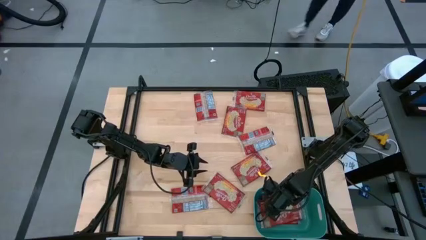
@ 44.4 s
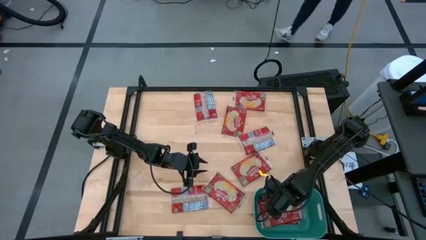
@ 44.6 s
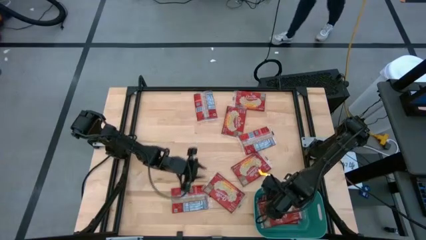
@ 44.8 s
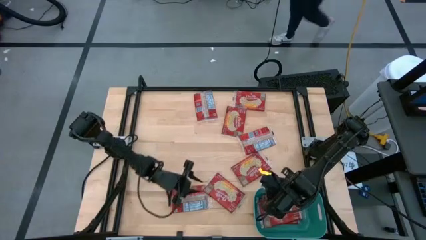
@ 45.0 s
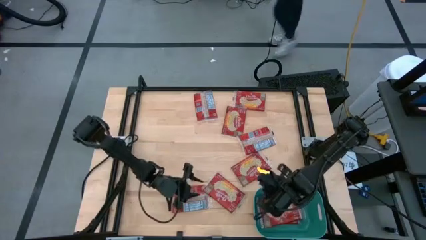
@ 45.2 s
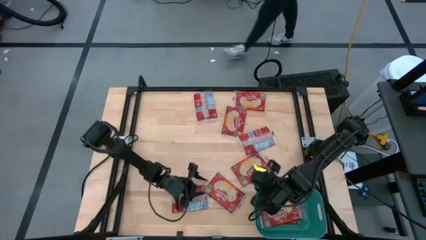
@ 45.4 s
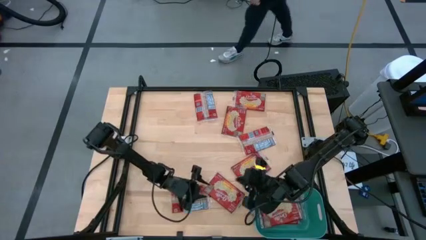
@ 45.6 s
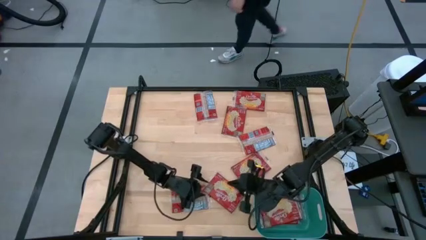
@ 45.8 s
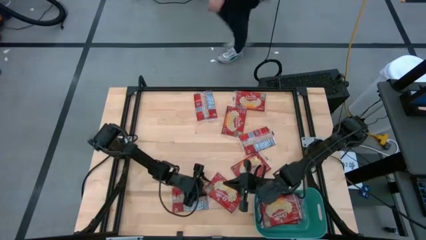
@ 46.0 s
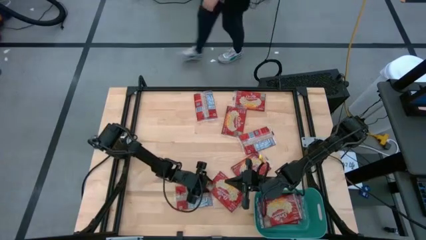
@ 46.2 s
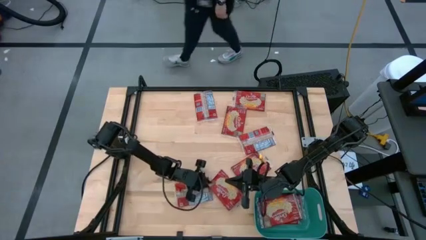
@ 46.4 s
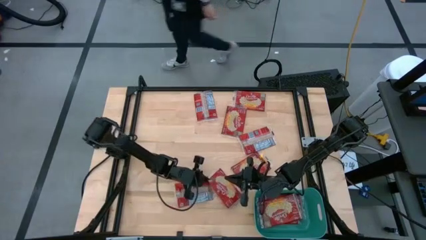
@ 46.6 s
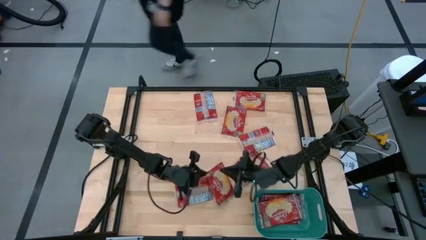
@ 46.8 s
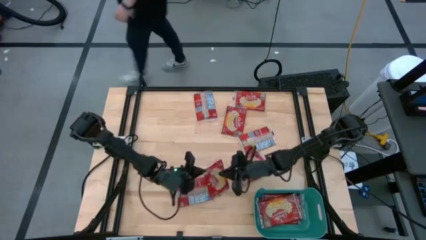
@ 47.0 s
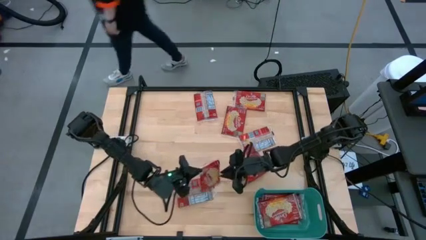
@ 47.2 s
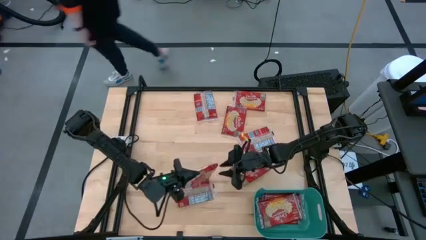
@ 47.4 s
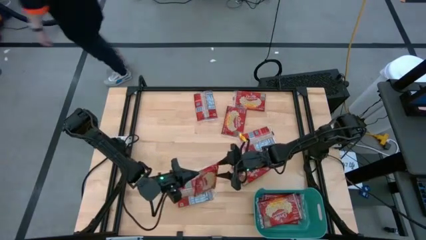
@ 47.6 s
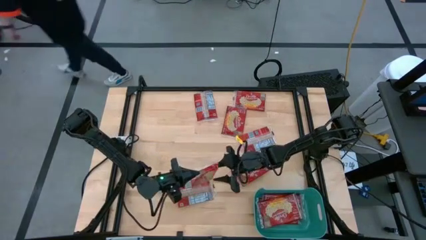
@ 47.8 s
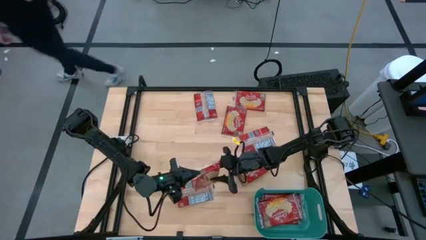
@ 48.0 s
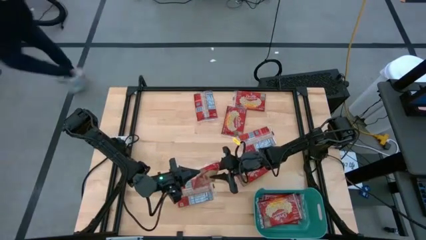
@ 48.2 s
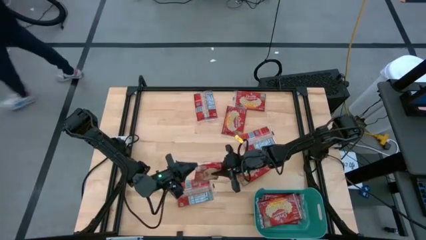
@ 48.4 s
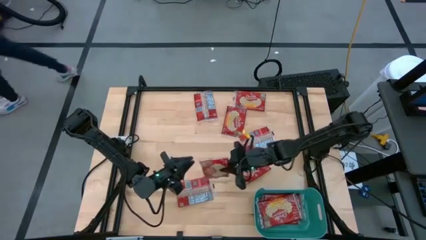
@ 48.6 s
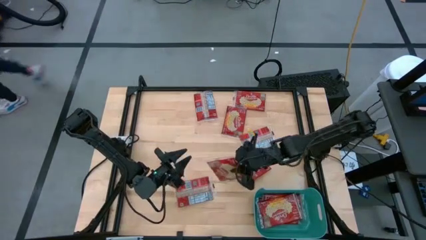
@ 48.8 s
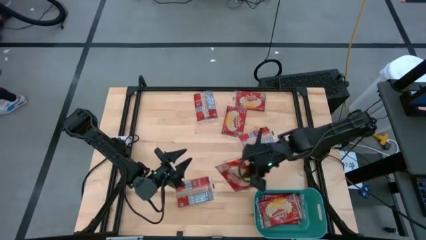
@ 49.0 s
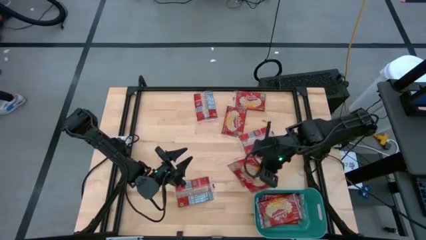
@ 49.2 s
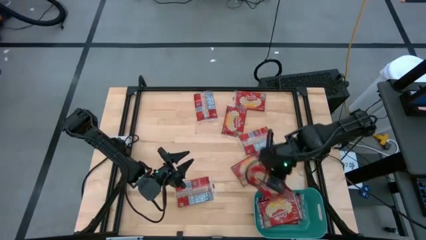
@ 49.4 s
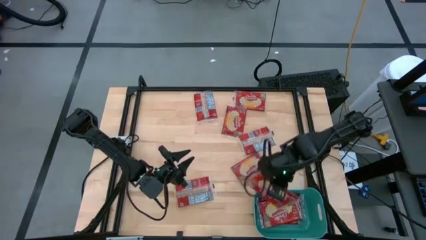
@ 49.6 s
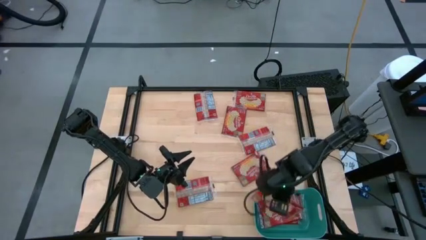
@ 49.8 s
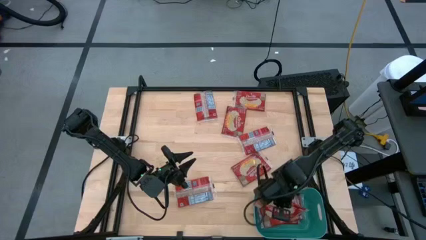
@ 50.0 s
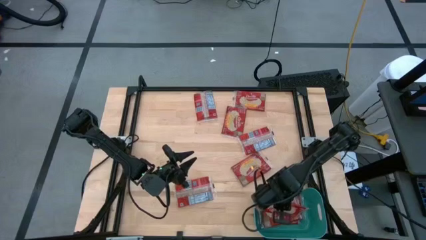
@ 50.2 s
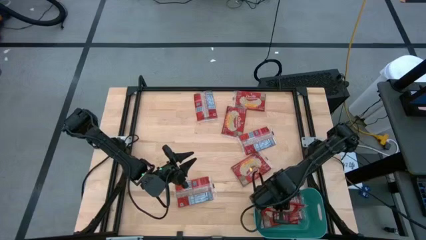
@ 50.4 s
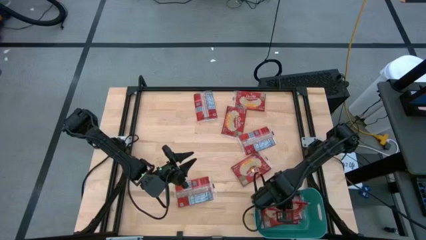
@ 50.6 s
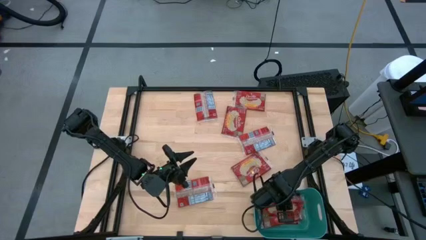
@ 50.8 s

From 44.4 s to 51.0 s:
Task: Sort popcorn bags into baskets
Put the popcorn bag into the green bin

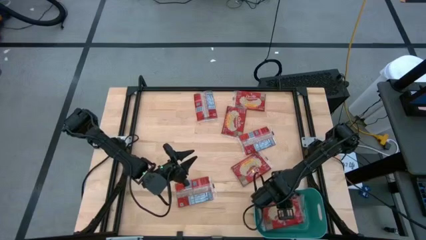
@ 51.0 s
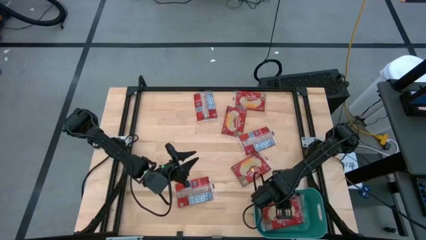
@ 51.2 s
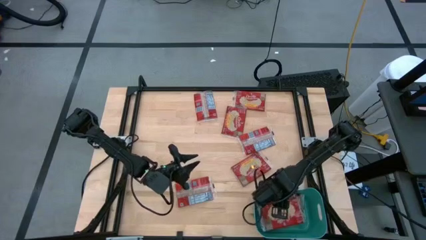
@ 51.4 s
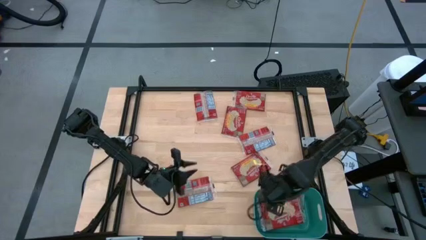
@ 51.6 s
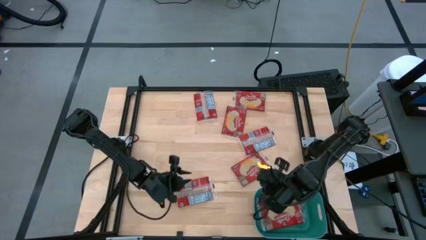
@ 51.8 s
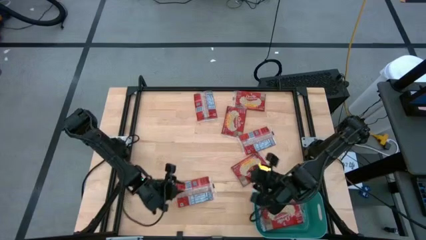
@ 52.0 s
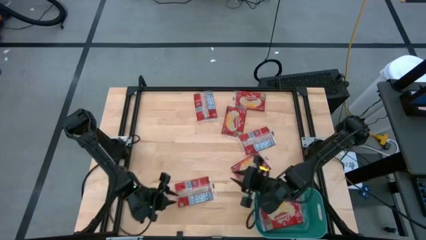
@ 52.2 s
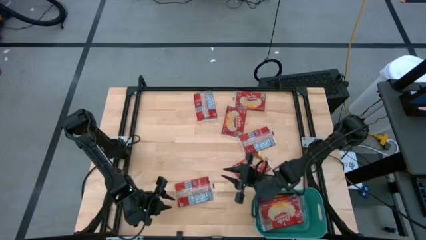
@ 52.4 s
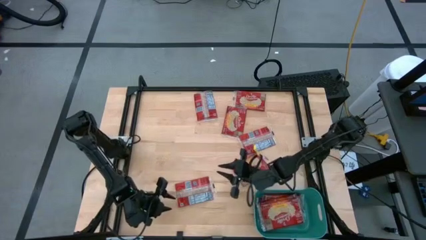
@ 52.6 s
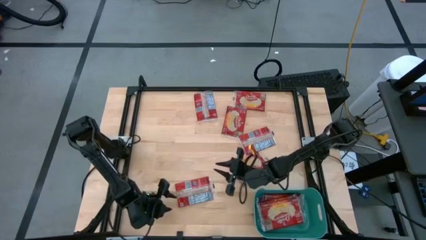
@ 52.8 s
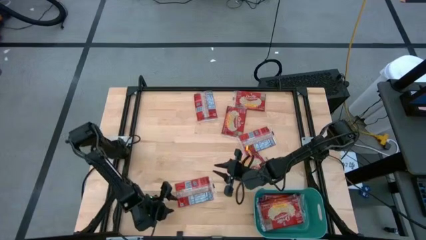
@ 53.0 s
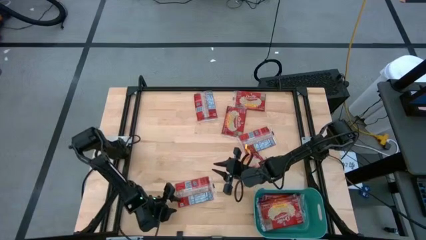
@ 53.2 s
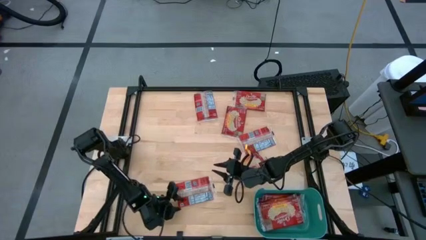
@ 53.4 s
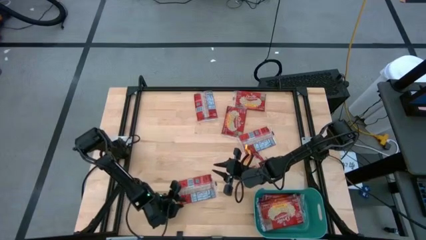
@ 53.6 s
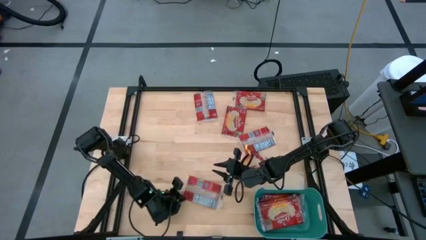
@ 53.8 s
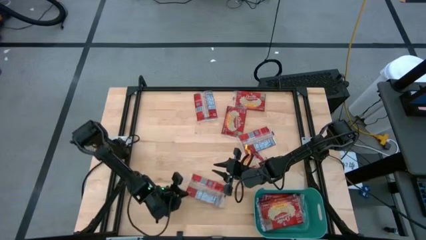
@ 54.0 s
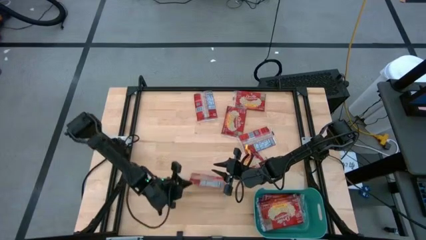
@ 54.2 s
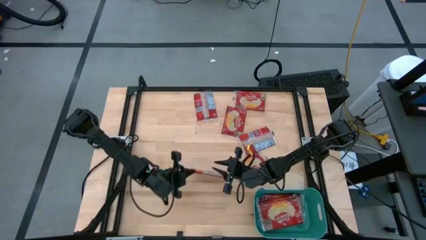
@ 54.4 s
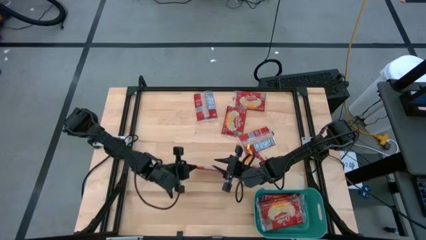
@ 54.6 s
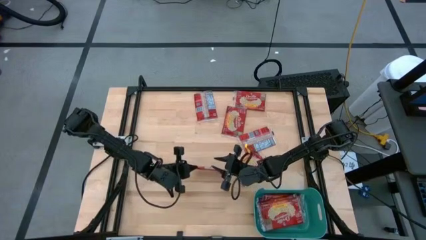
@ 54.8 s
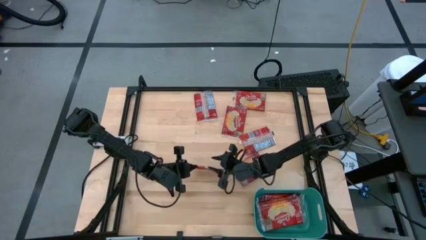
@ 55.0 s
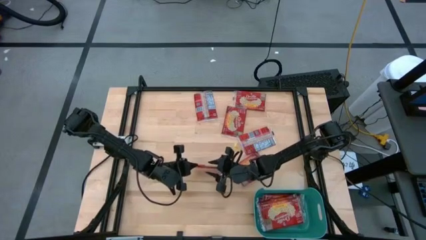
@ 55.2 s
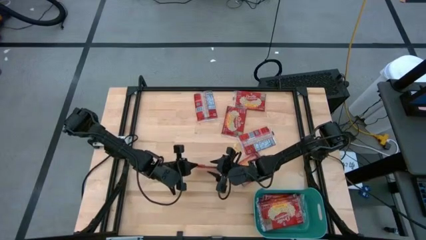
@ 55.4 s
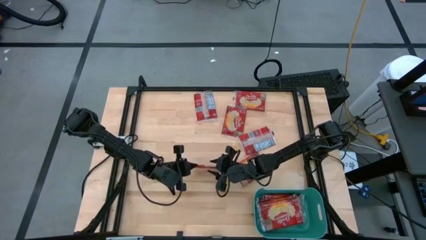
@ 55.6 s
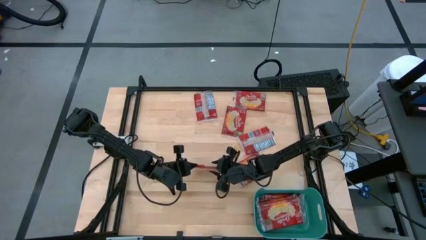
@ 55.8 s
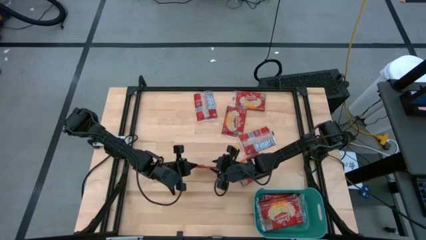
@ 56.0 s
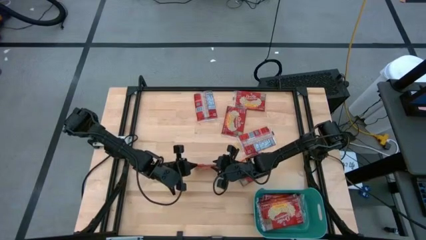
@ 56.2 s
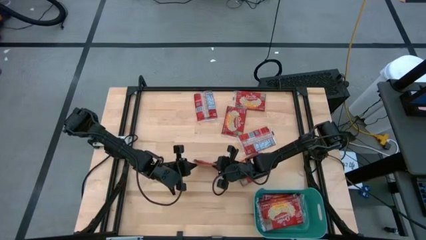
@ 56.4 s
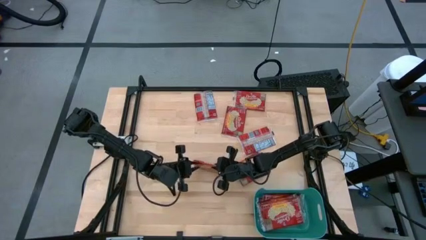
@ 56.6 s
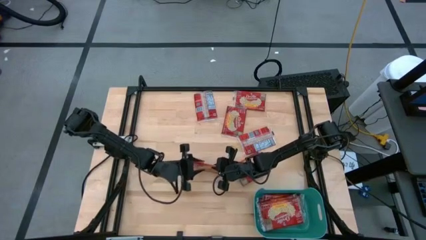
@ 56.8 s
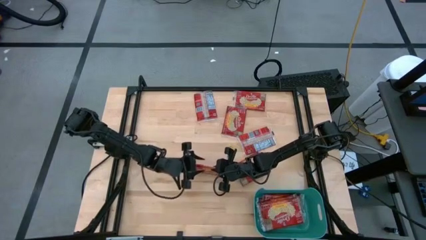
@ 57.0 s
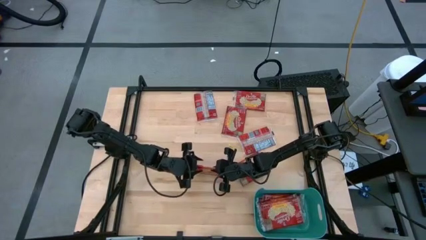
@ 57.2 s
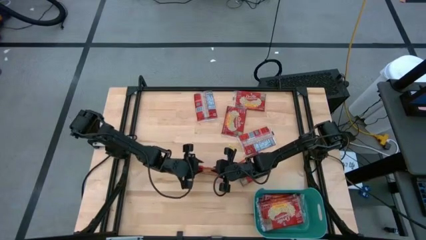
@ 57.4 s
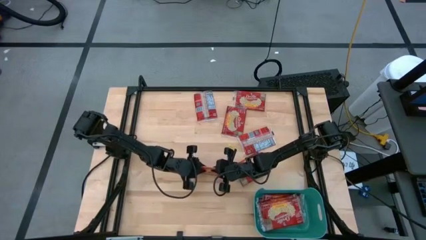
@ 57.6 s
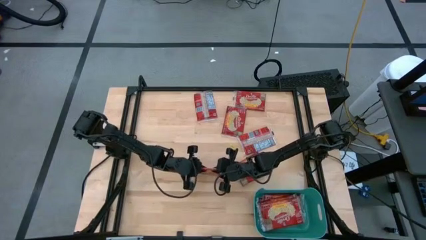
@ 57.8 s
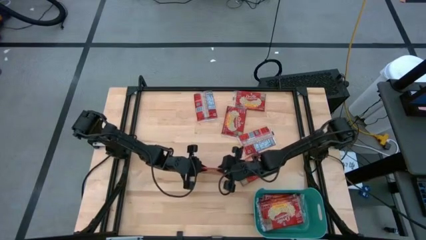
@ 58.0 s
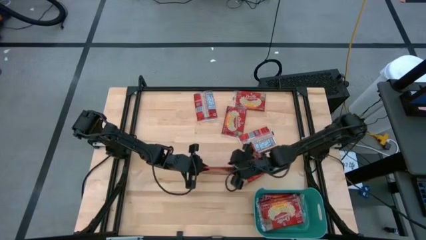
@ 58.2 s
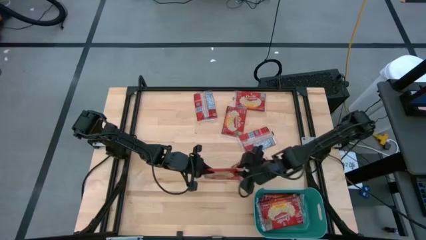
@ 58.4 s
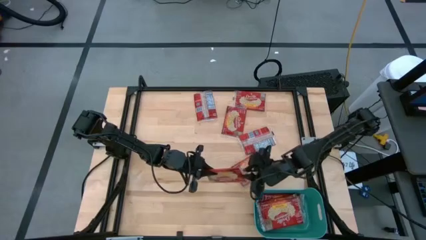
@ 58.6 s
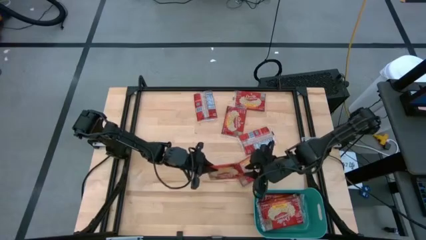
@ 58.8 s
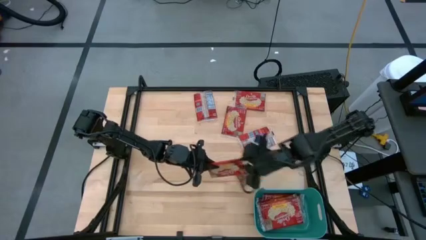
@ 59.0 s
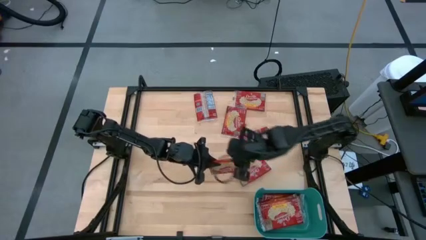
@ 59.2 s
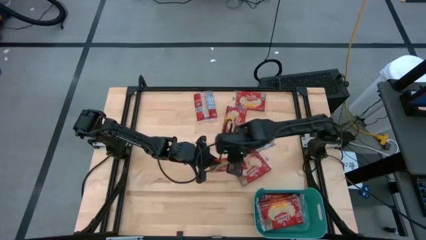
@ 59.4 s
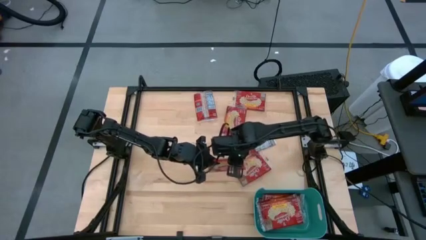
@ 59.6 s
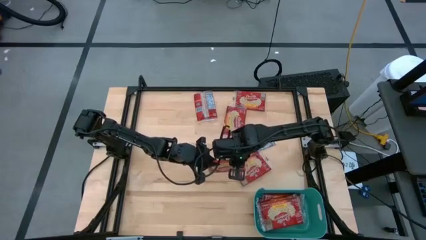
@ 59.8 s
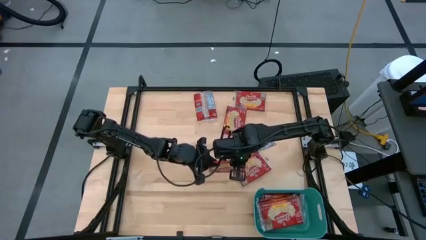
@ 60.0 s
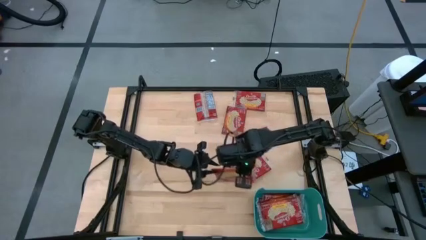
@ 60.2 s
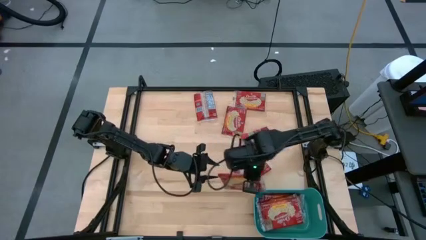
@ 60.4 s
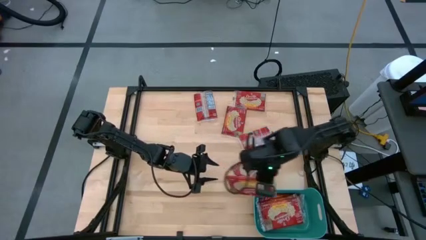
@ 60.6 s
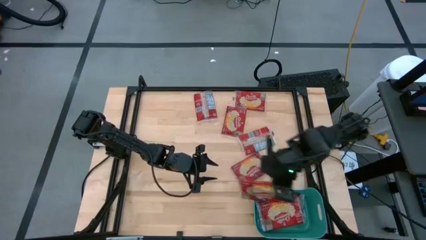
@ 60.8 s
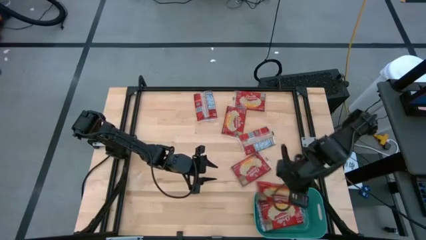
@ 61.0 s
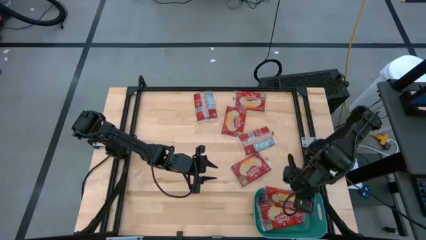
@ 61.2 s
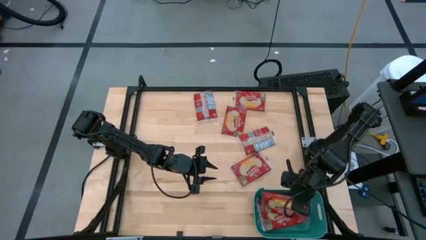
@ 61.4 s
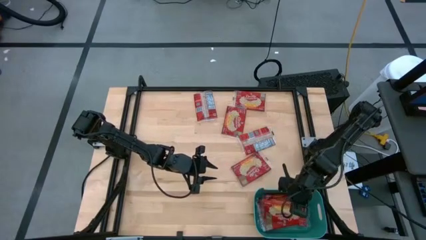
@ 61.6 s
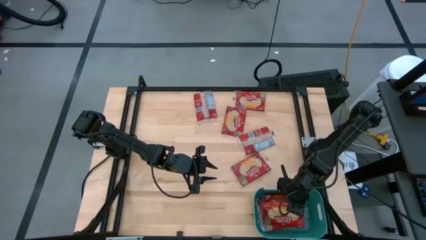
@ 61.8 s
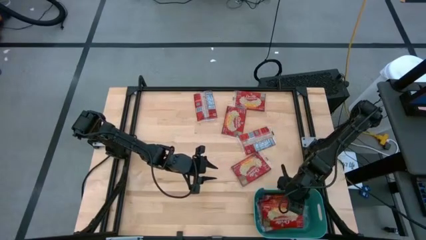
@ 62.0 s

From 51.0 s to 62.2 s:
Put the popcorn bag into the green bin
